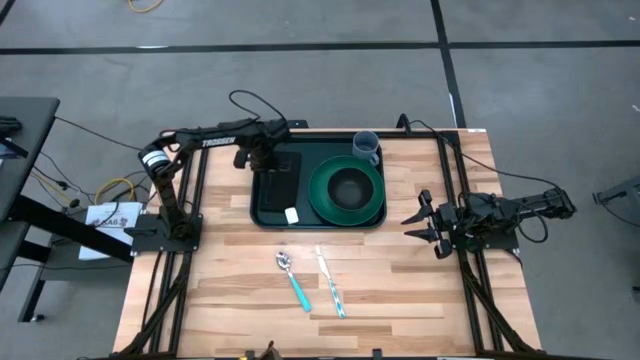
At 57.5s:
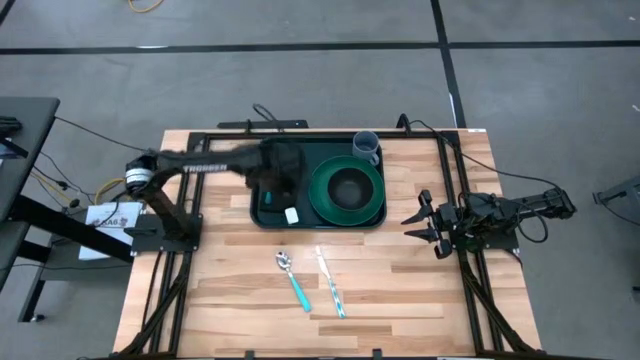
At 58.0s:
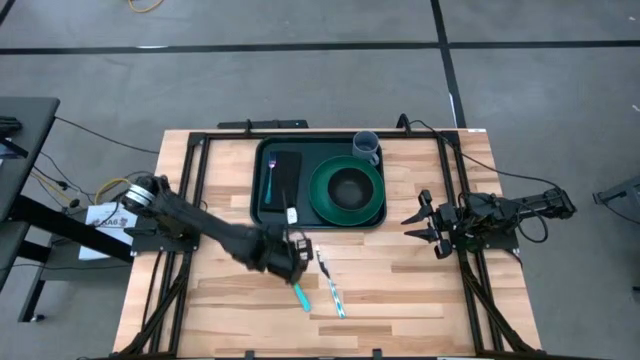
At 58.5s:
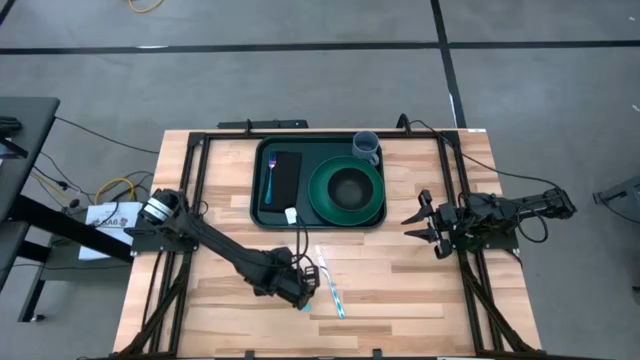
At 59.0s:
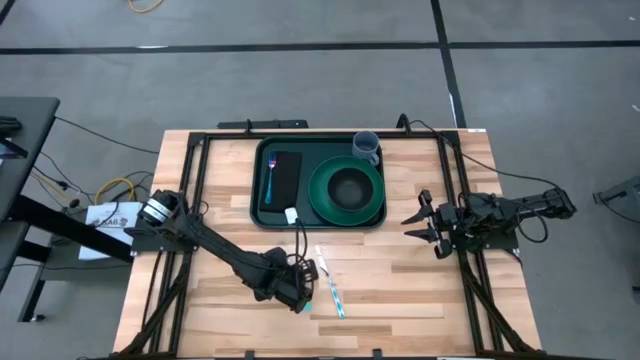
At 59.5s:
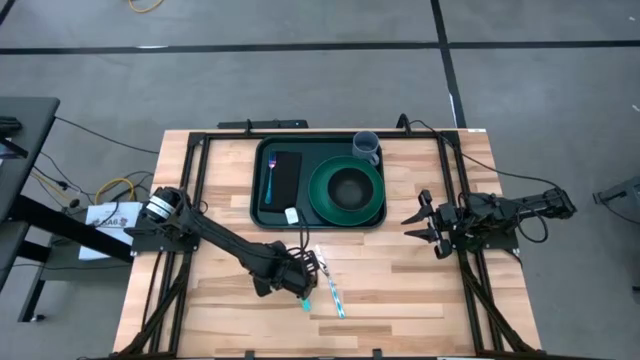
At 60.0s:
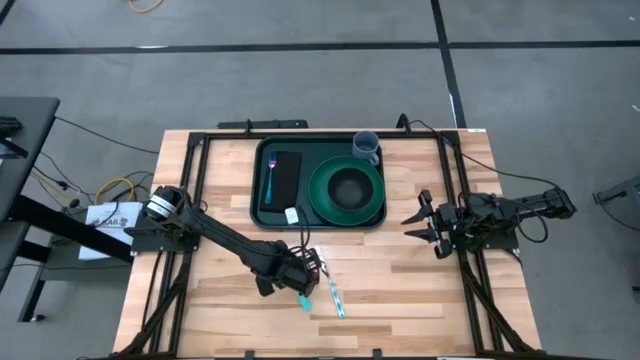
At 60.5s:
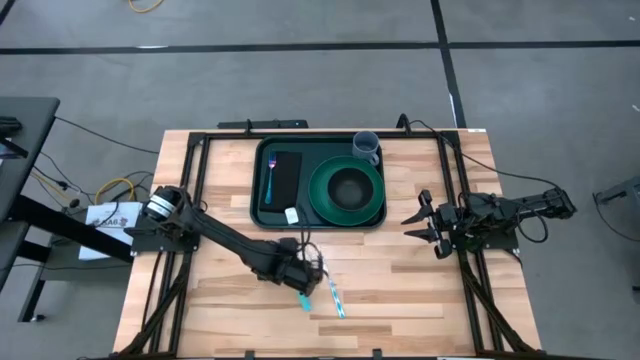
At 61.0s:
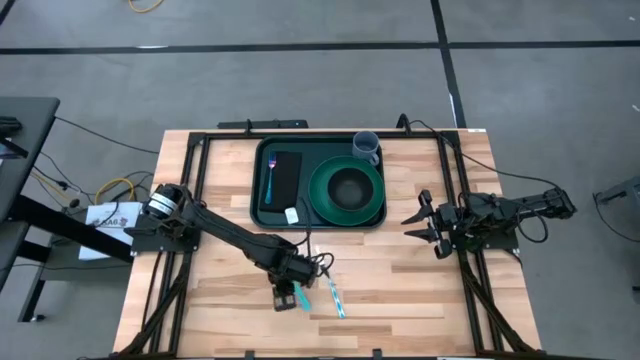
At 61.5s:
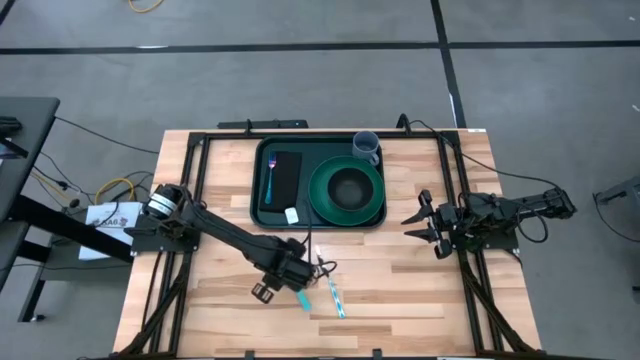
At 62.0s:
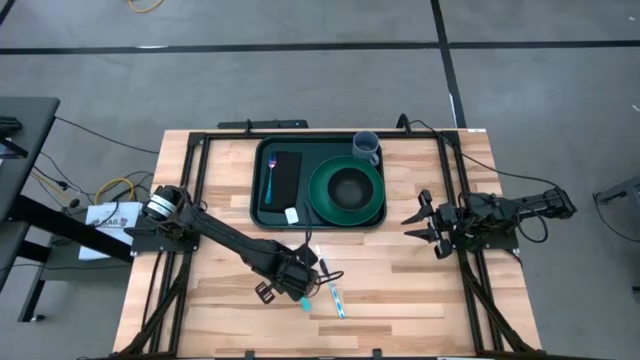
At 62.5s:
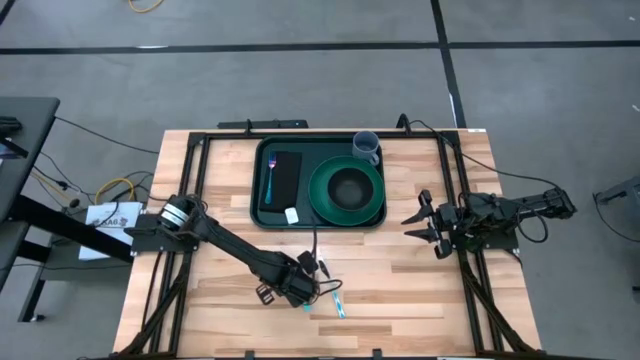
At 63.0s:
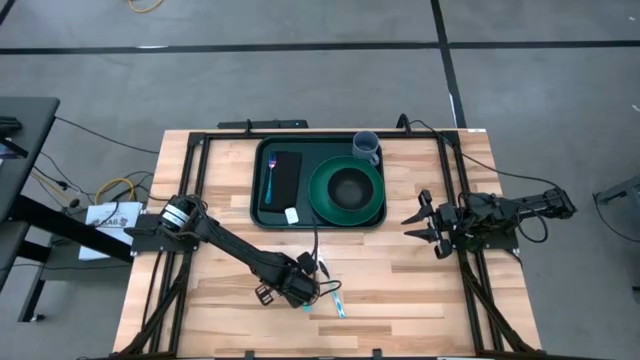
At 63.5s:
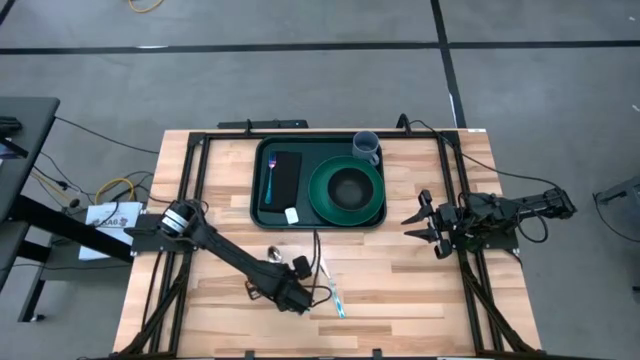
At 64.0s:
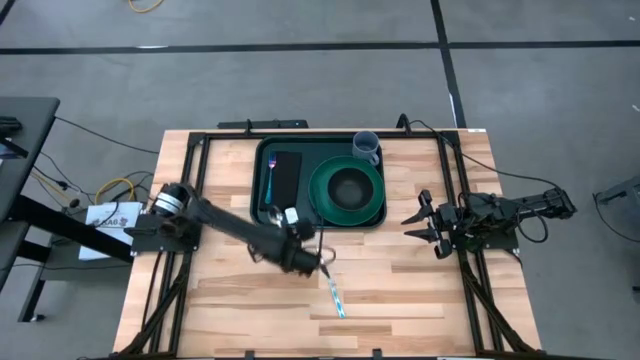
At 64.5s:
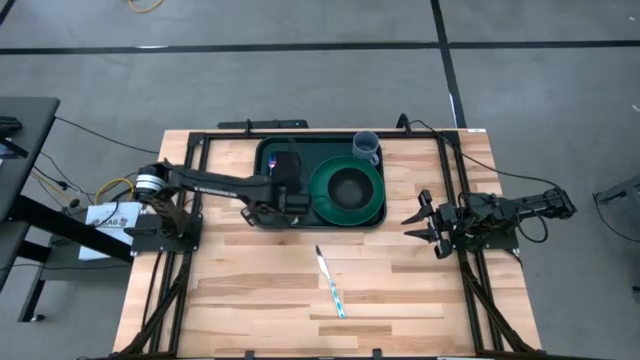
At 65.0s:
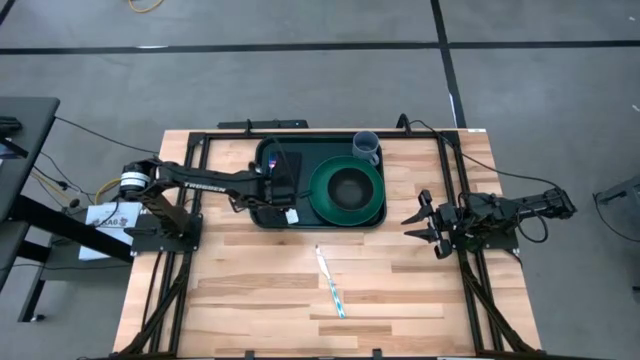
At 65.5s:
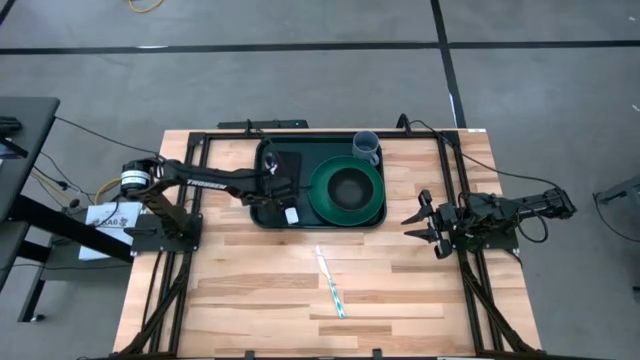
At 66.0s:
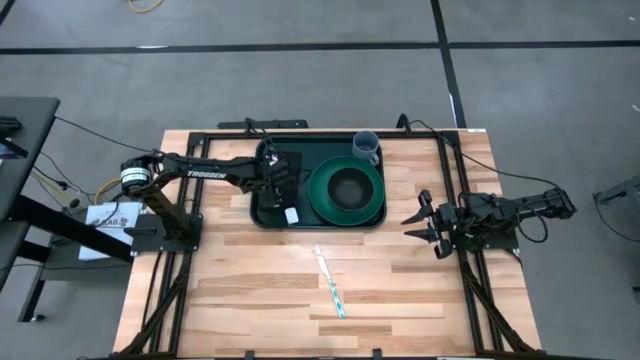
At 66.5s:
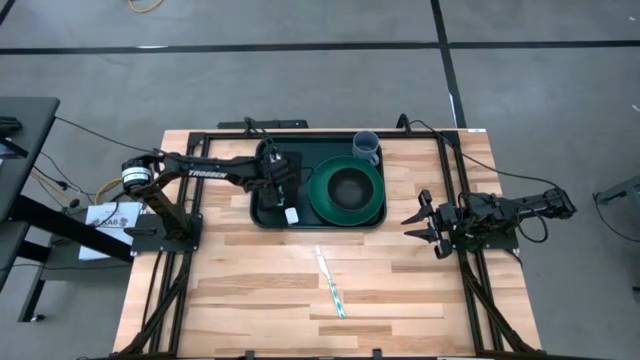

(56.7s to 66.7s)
Task: Set up tray
Put the blue spoon on the black napkin to the right of the purple fork

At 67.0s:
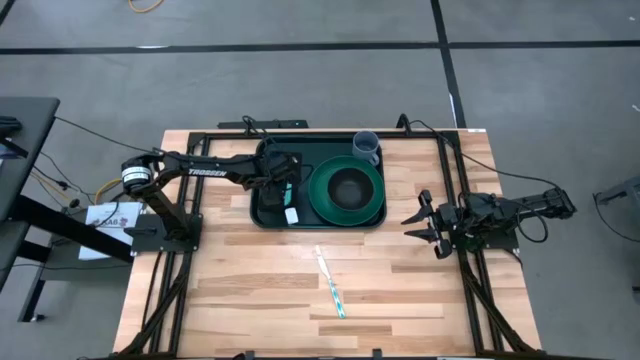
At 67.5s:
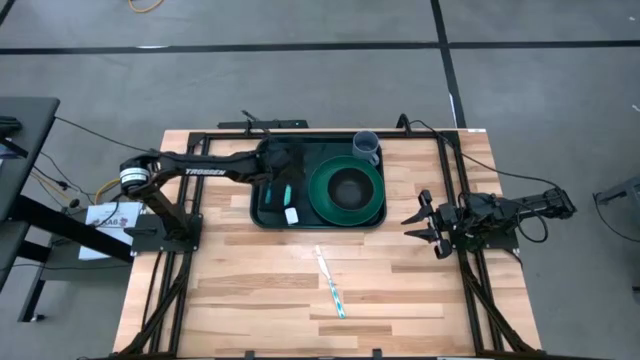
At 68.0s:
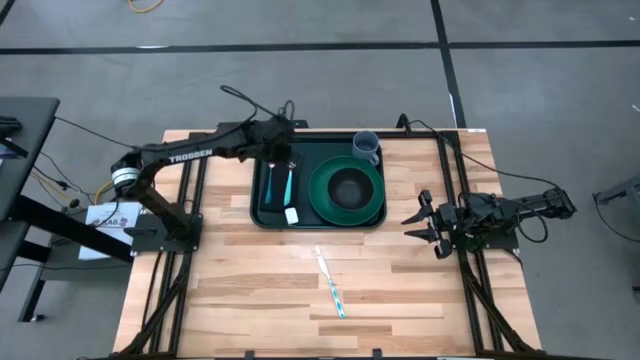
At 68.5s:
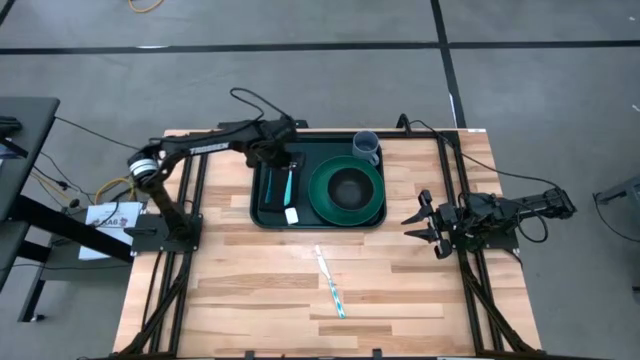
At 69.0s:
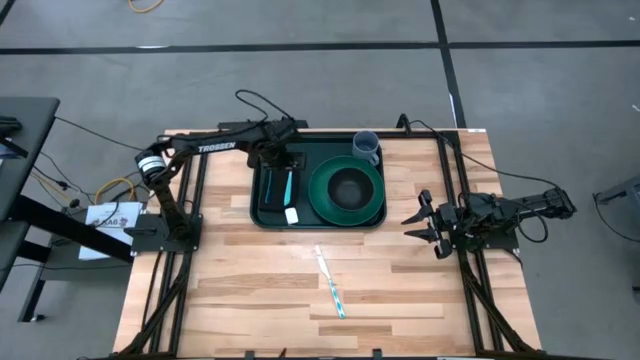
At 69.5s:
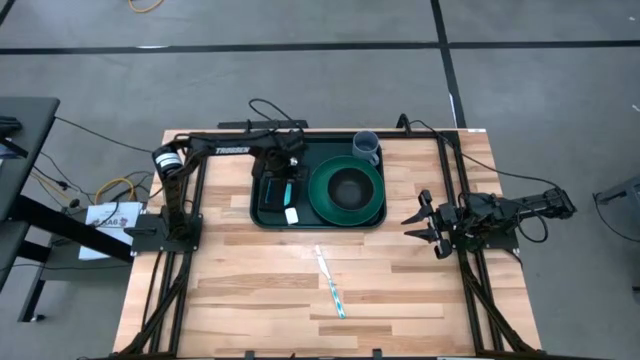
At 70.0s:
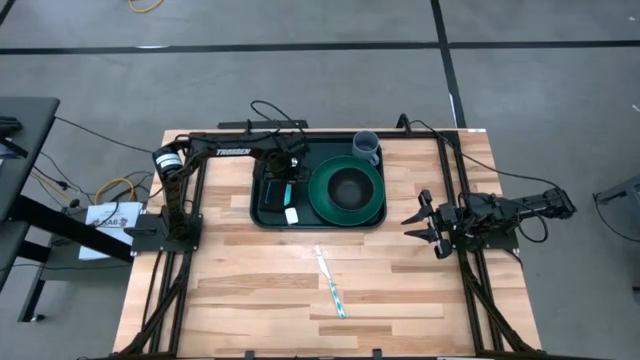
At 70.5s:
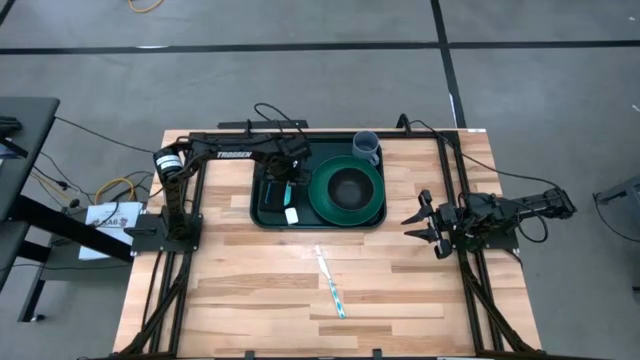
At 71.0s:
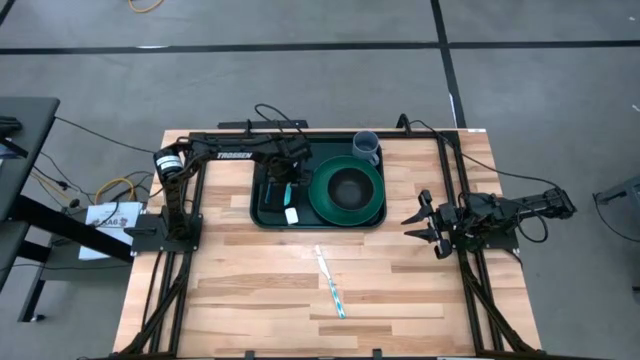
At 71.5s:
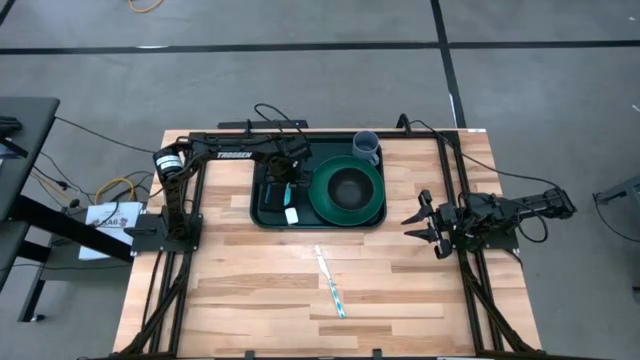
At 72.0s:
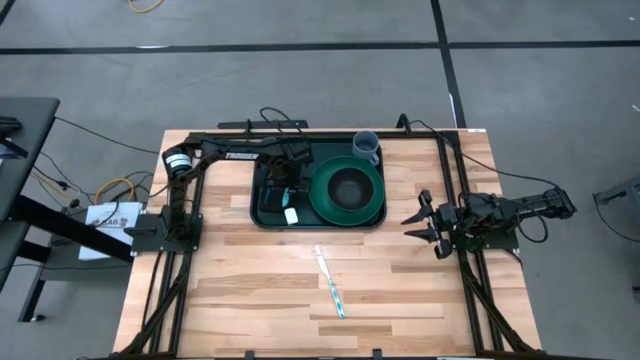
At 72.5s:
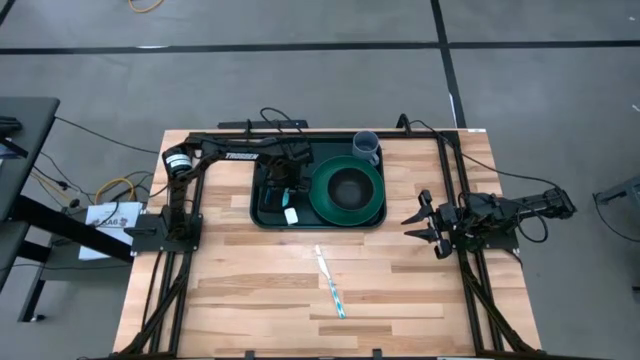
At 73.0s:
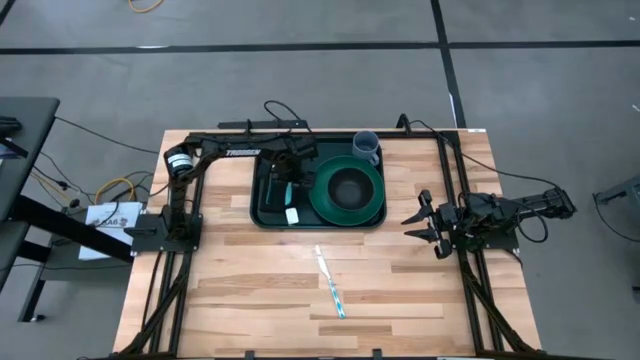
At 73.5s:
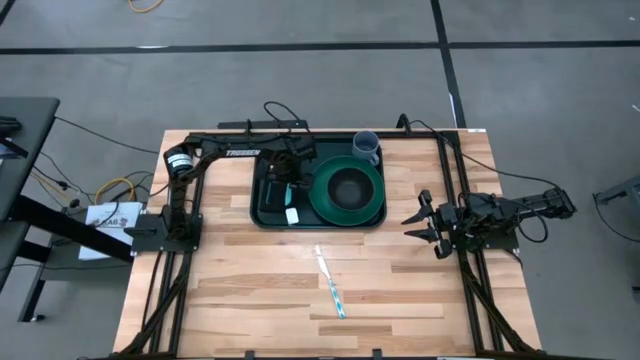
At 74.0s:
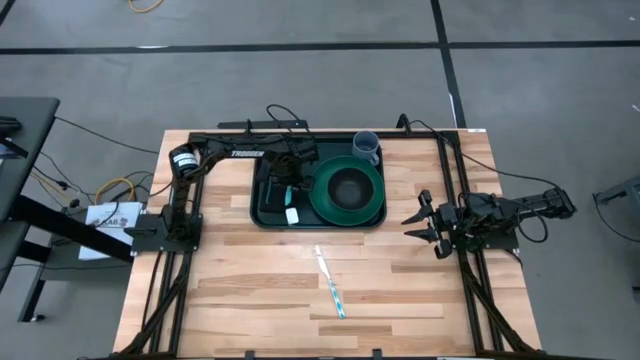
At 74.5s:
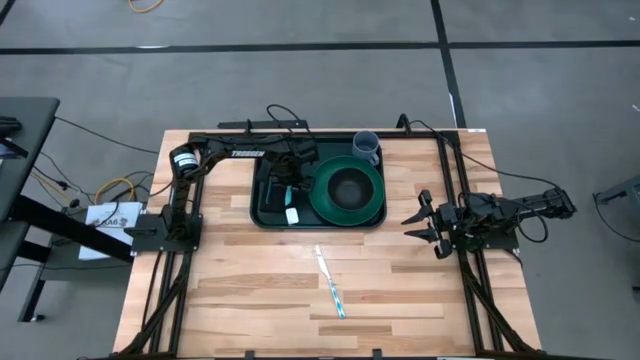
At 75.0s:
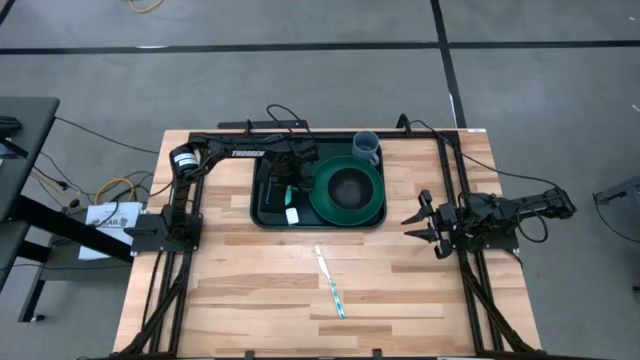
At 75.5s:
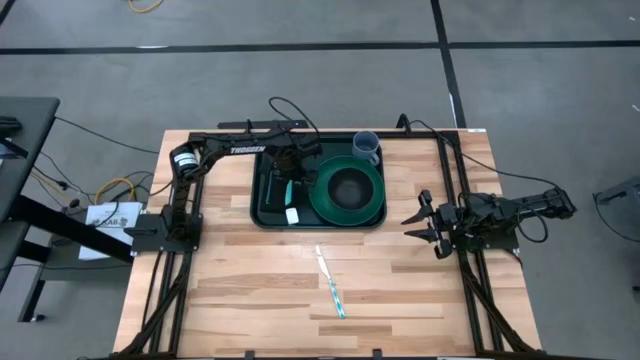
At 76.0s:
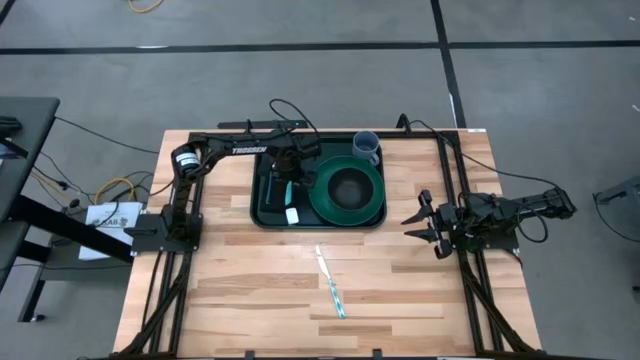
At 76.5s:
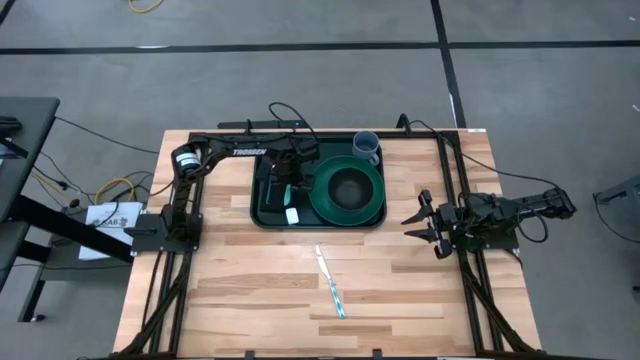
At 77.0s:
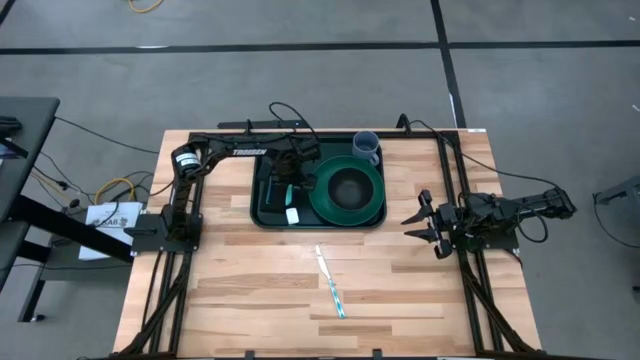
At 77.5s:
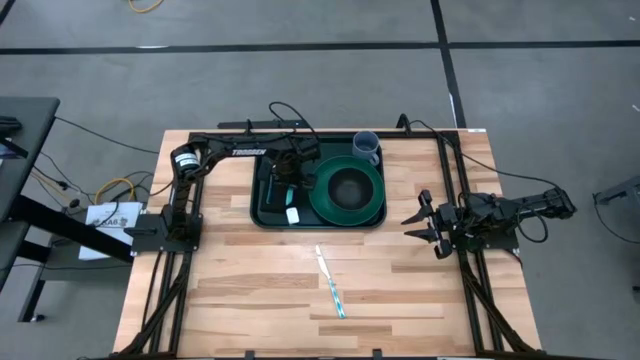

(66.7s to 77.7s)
Adjust the blue spoon on the black napkin
